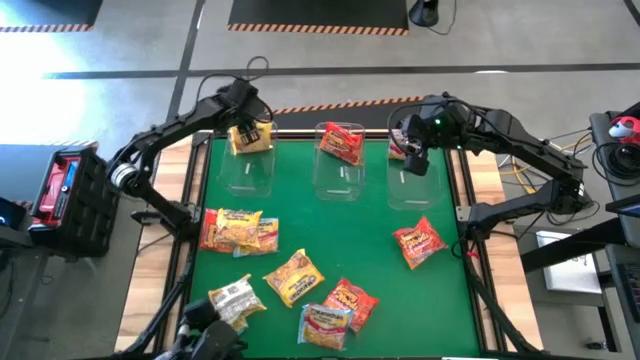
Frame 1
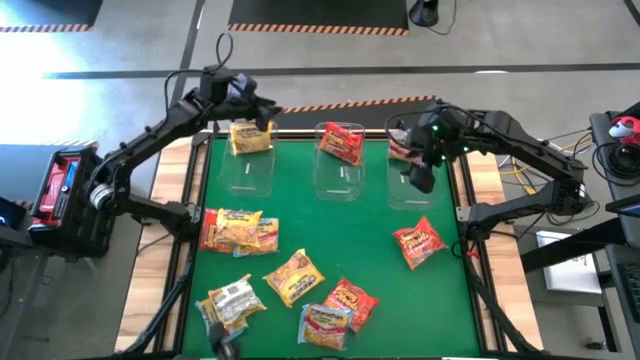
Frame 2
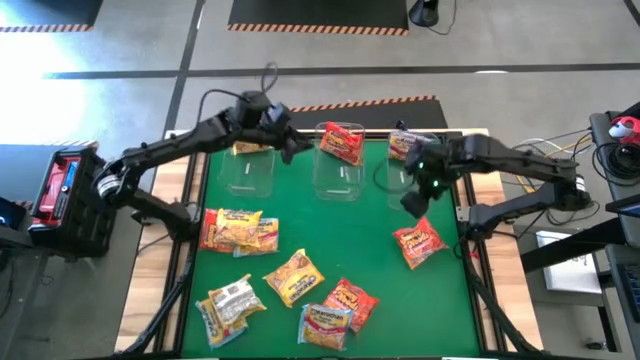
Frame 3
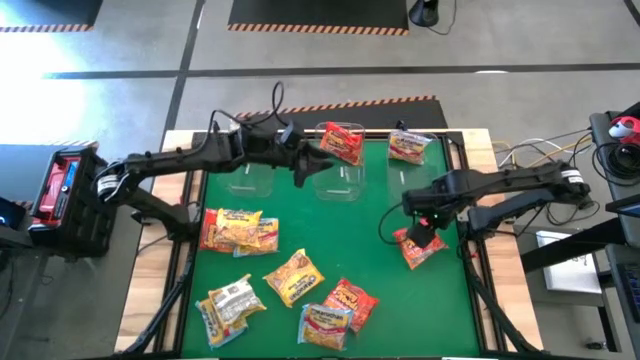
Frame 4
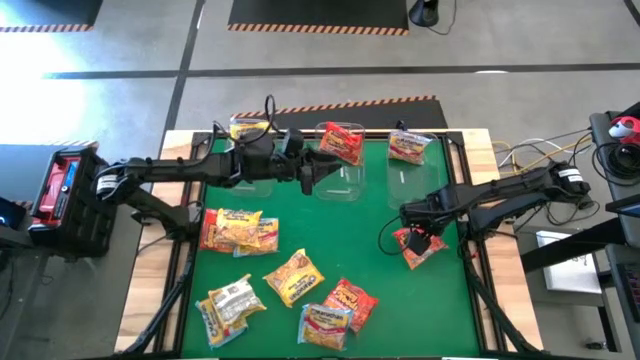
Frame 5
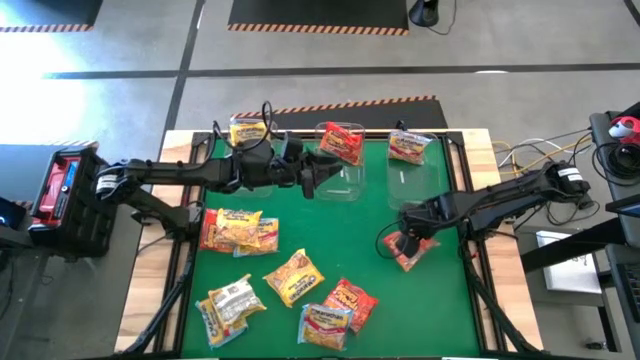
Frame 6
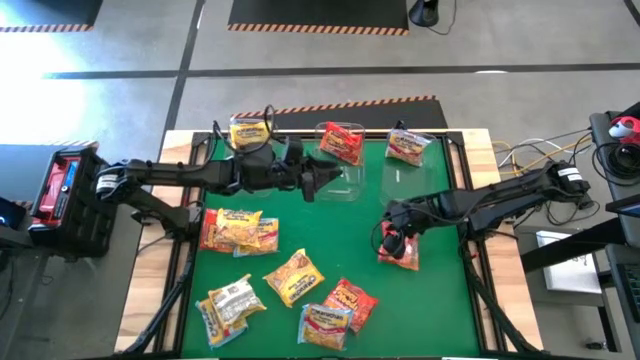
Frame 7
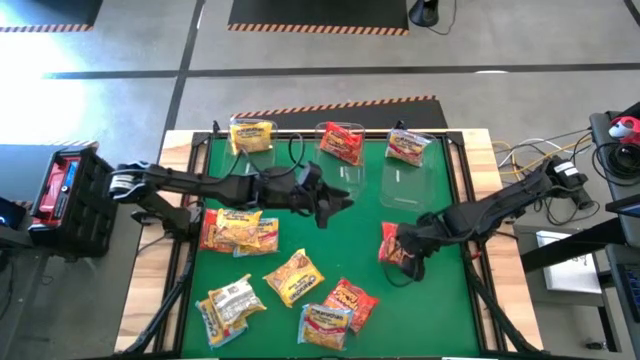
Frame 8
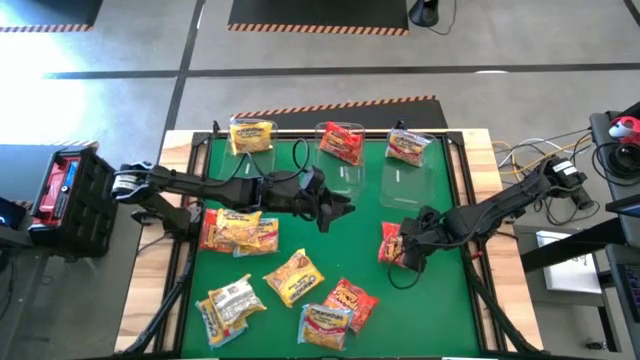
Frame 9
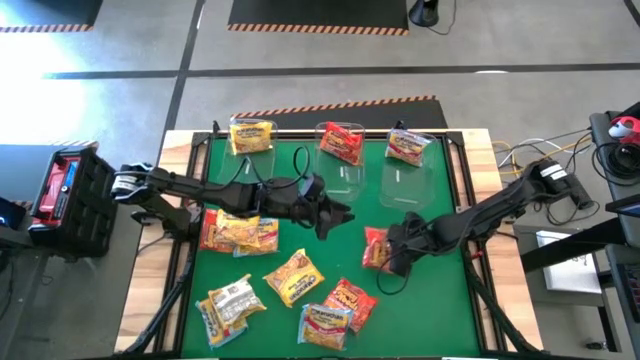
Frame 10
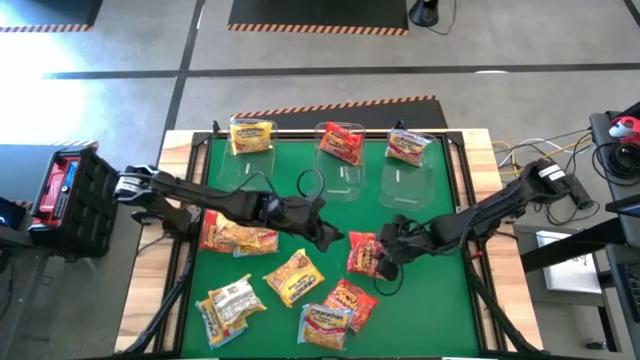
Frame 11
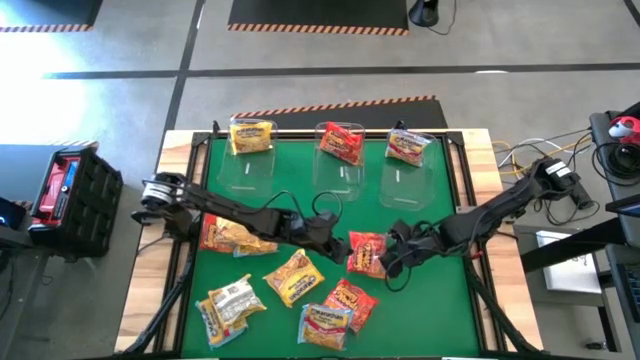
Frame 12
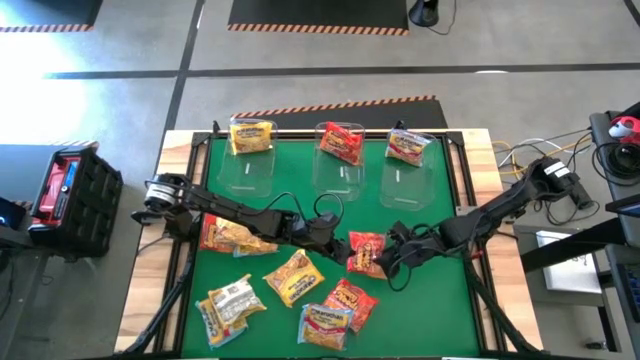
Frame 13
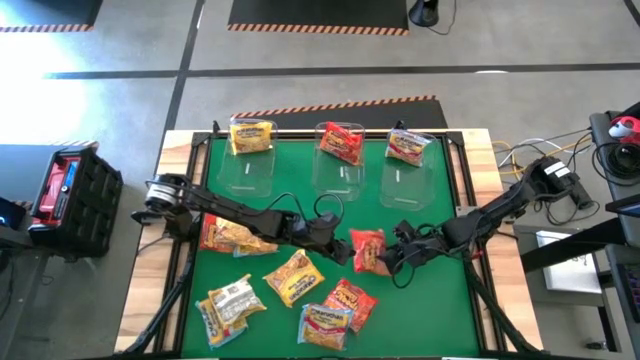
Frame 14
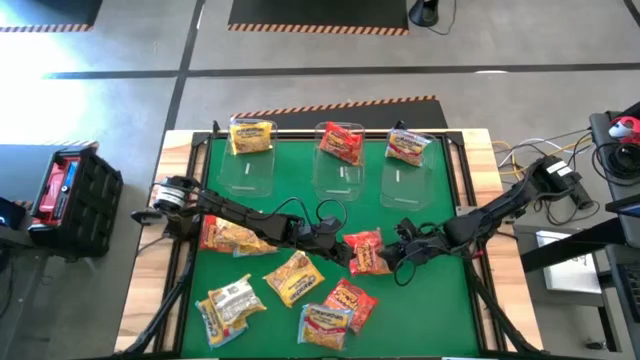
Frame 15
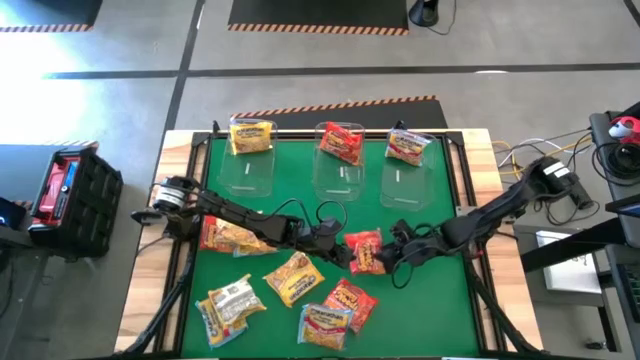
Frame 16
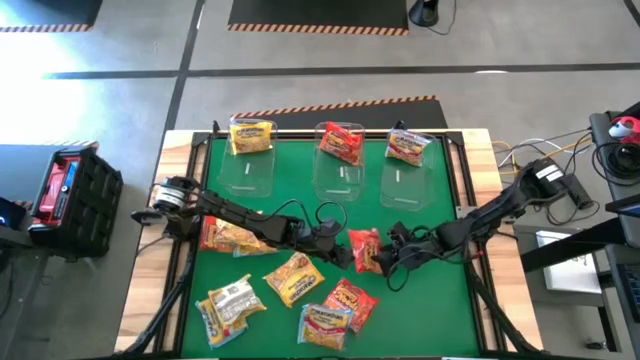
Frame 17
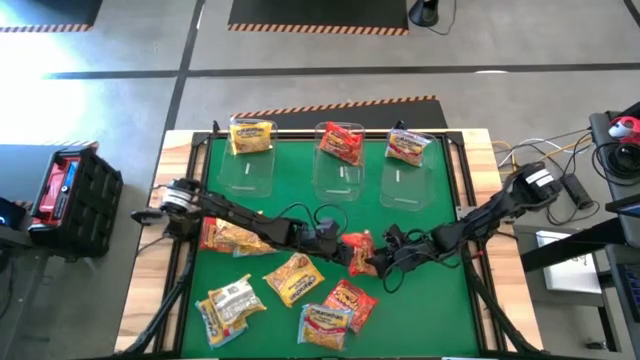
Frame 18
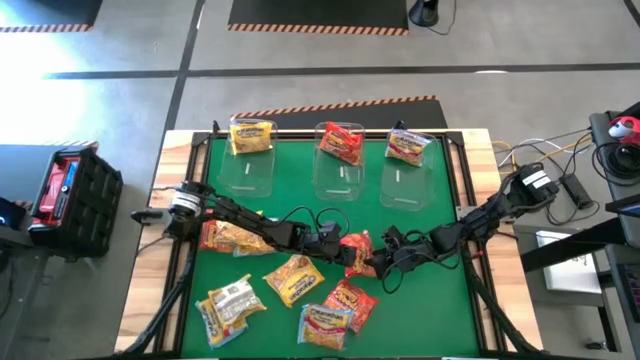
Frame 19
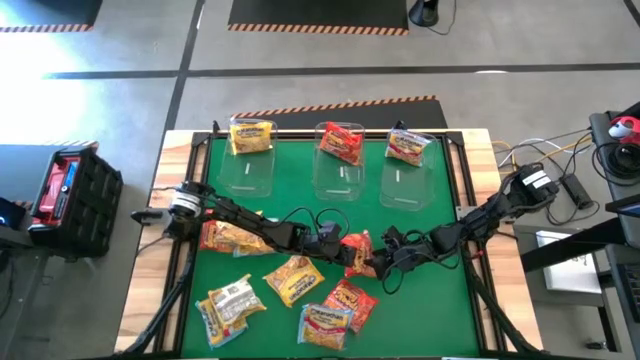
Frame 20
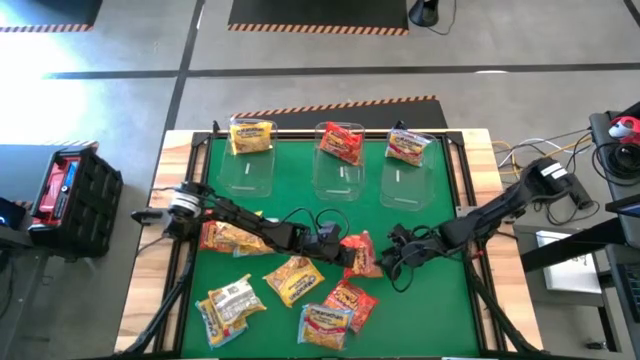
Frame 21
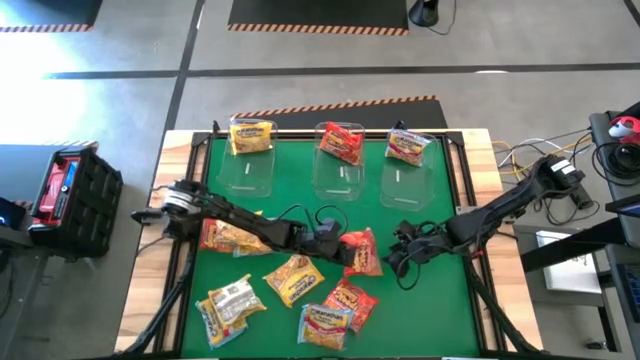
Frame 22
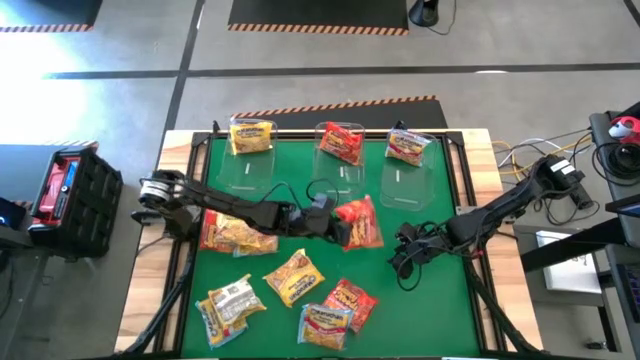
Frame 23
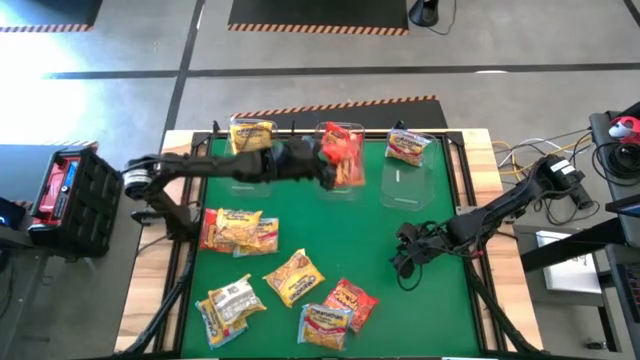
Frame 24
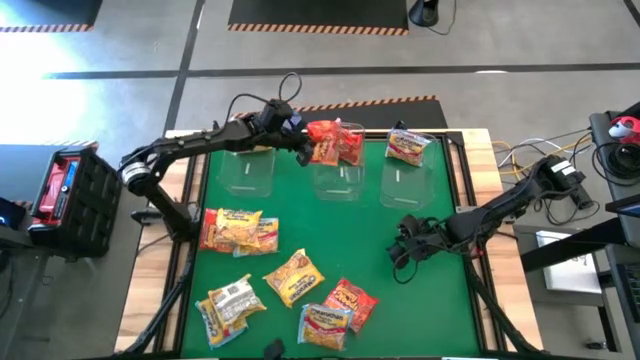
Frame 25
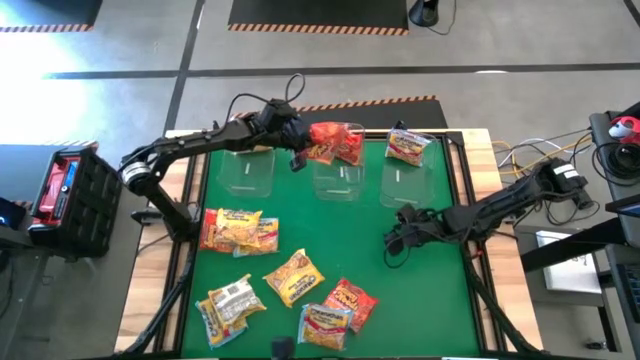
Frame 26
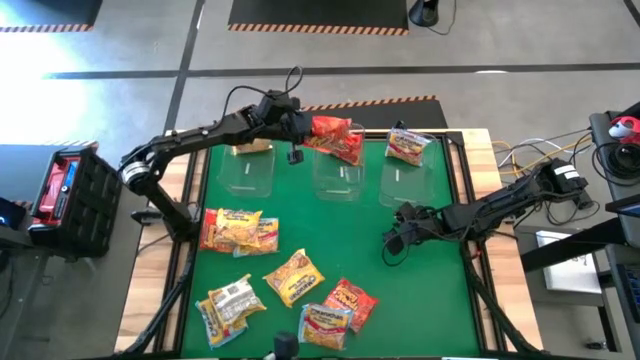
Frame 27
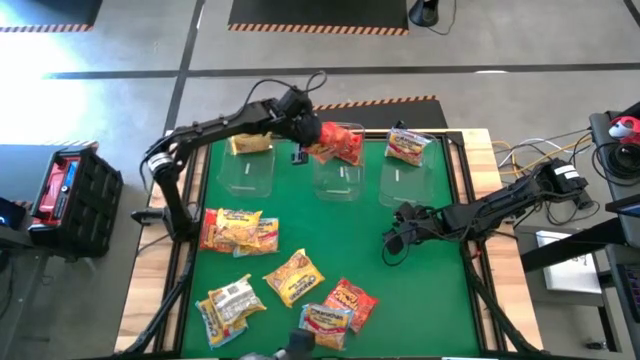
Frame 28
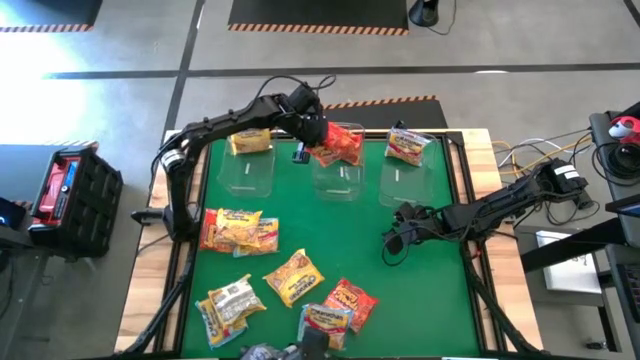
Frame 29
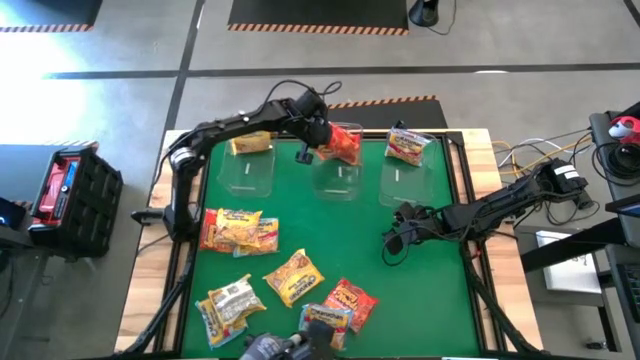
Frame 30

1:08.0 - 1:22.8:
Task: Sort Maruchan noodles
Put the orange noodle pack into the middle transparent bin

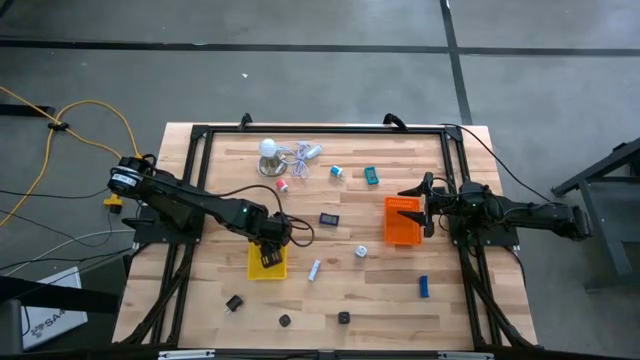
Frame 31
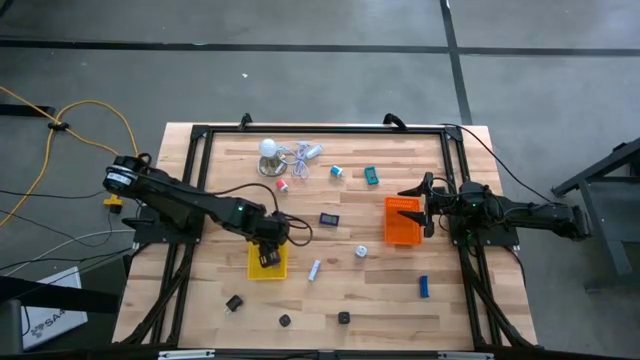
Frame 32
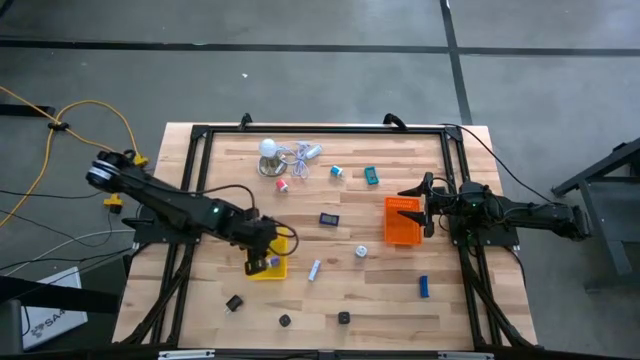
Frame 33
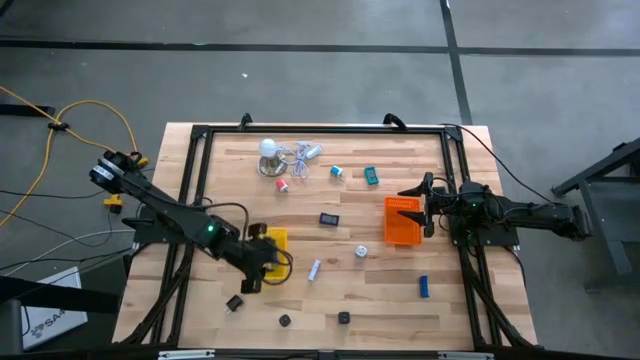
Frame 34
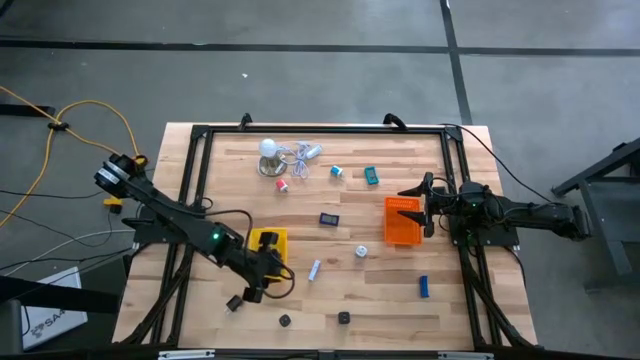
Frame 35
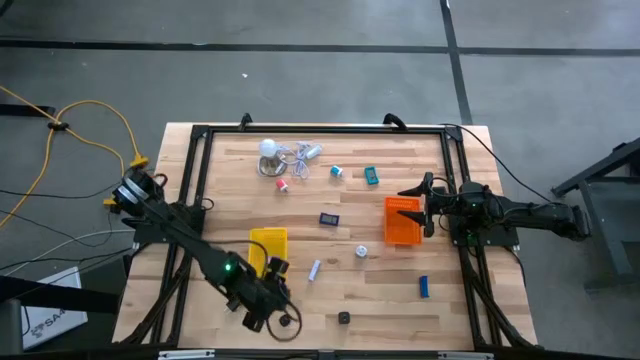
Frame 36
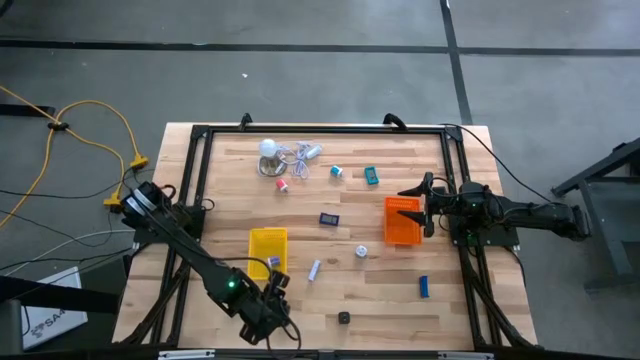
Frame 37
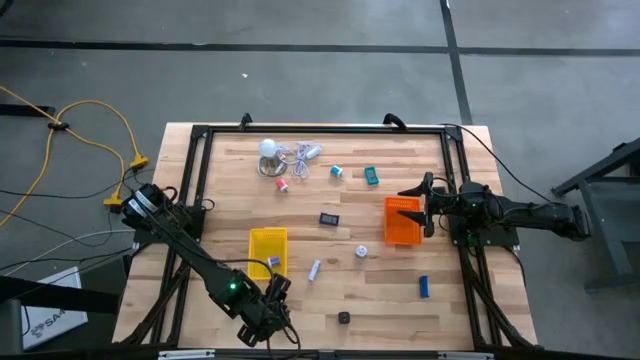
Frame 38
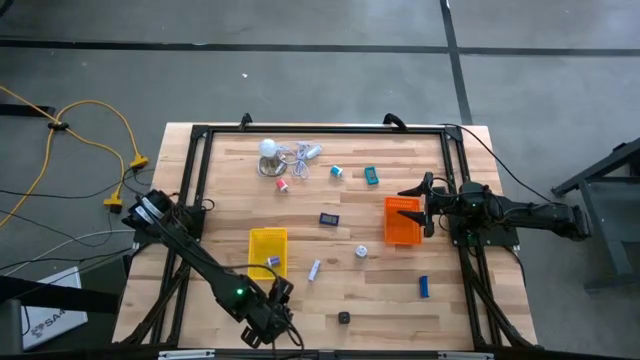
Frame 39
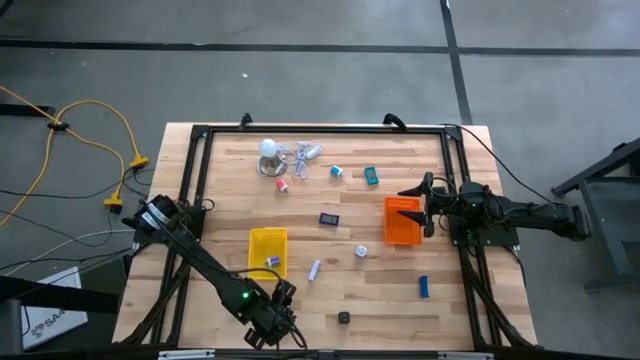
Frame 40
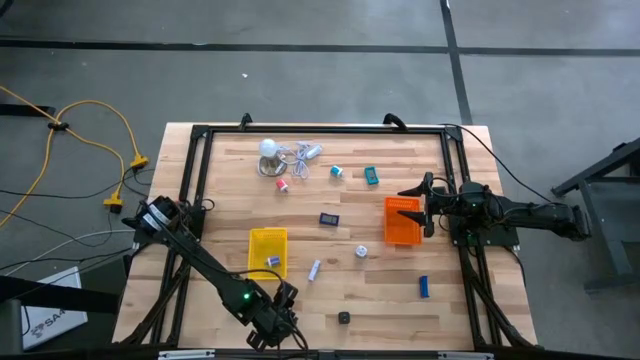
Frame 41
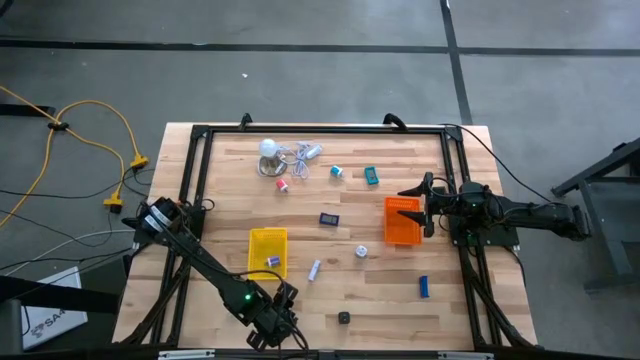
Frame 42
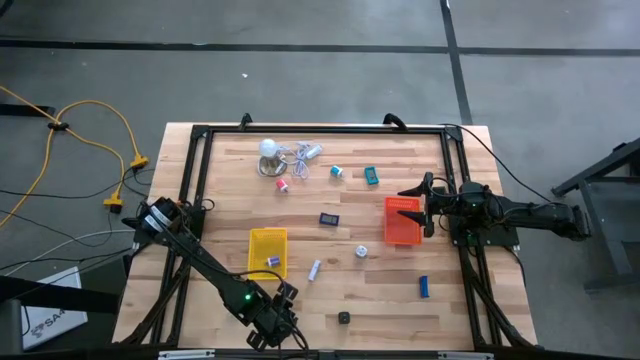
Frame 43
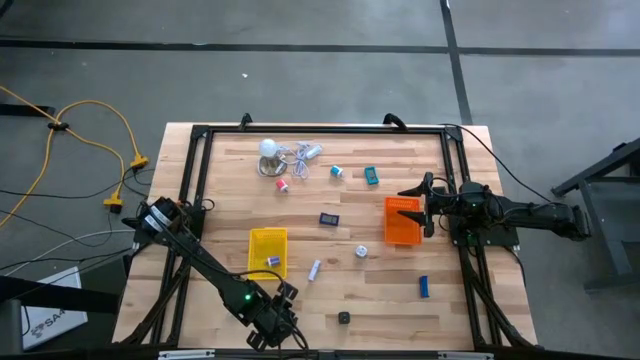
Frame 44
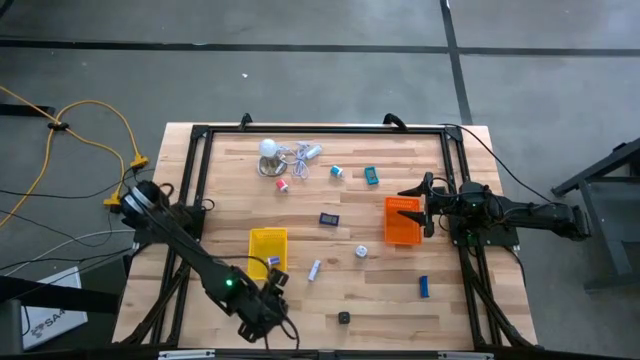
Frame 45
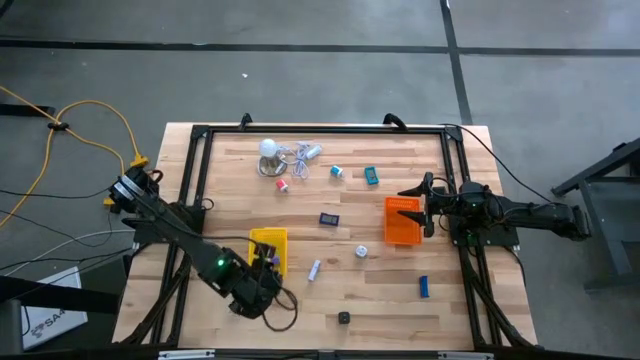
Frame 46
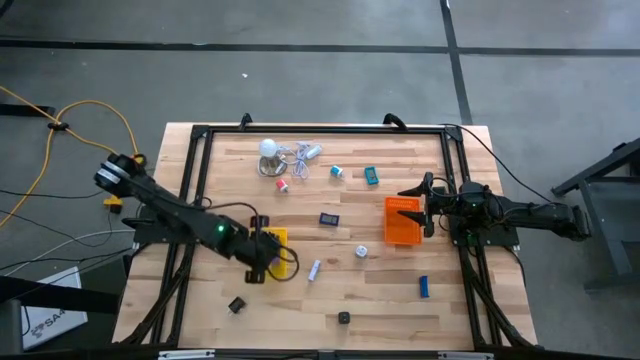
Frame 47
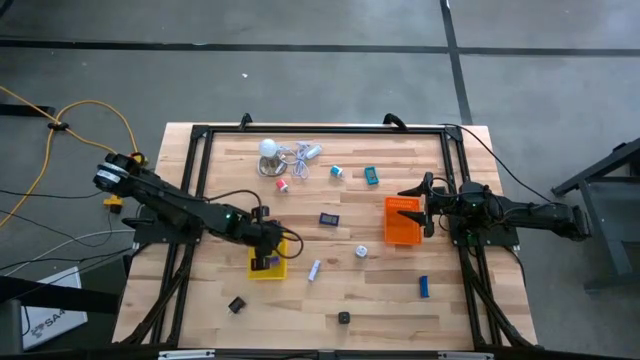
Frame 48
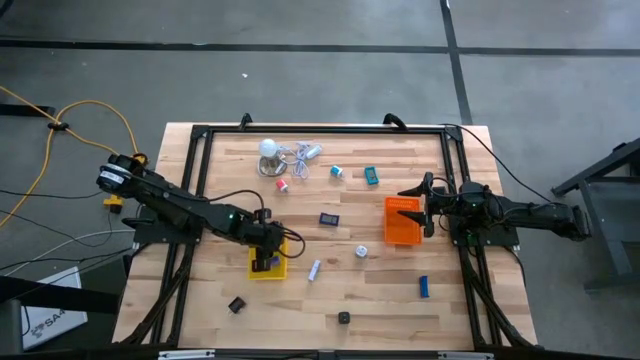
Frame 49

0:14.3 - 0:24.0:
Task: Pick & Place Office items
Put the white charger adapter into the yellow bin
